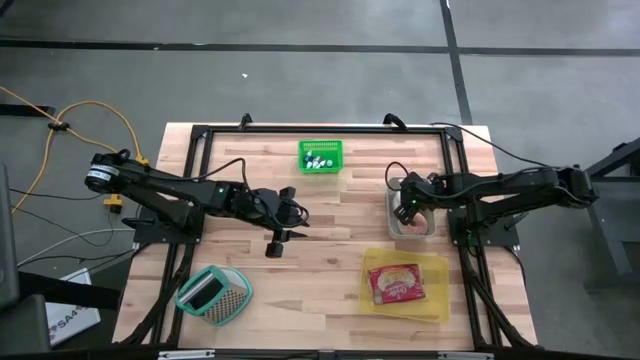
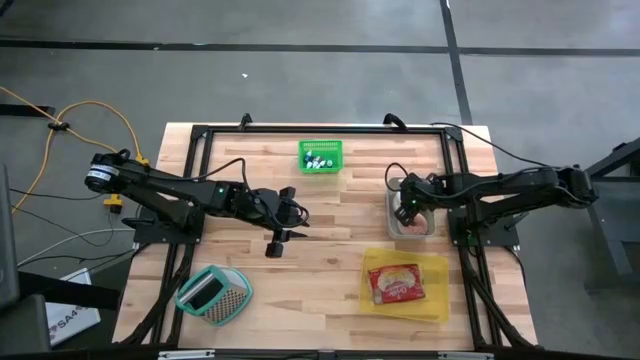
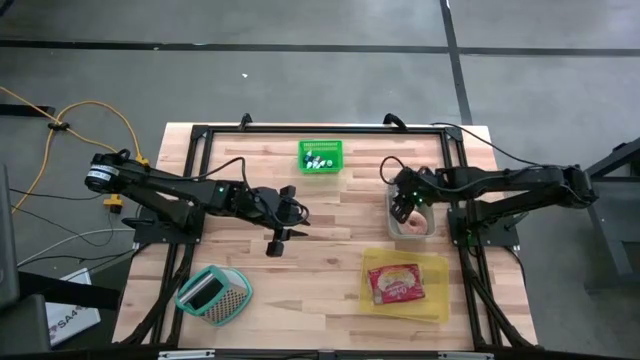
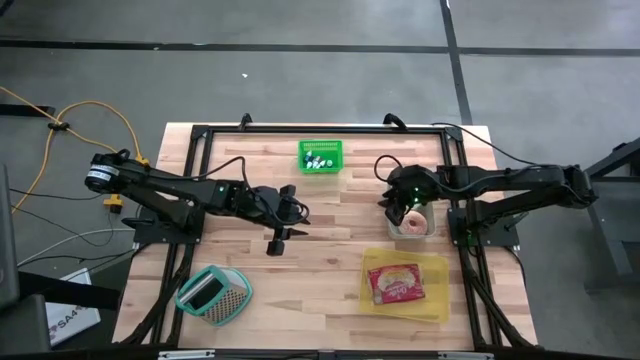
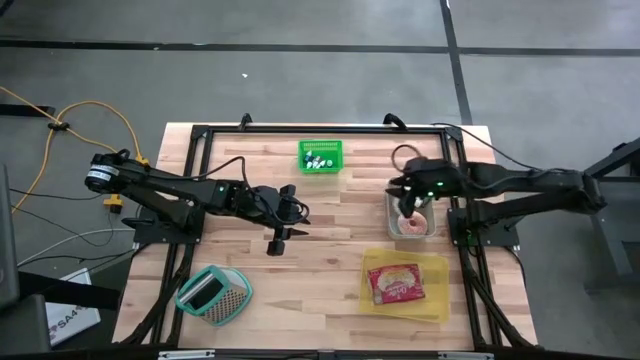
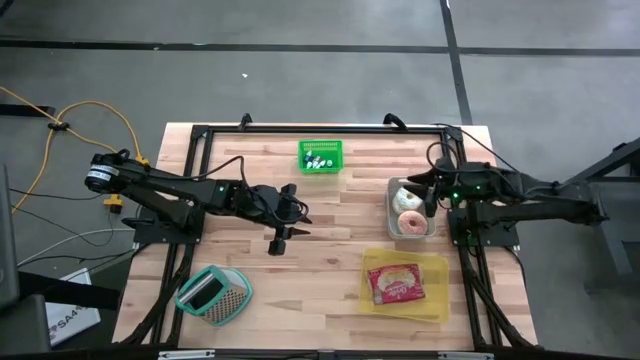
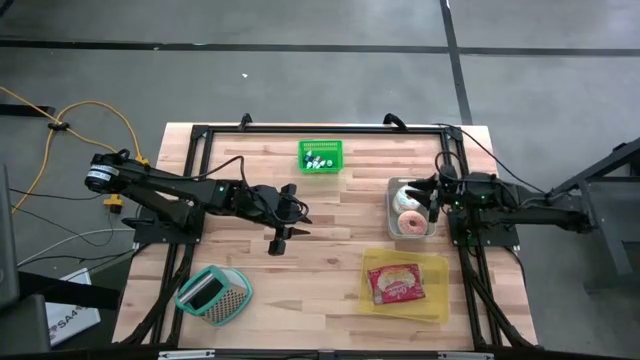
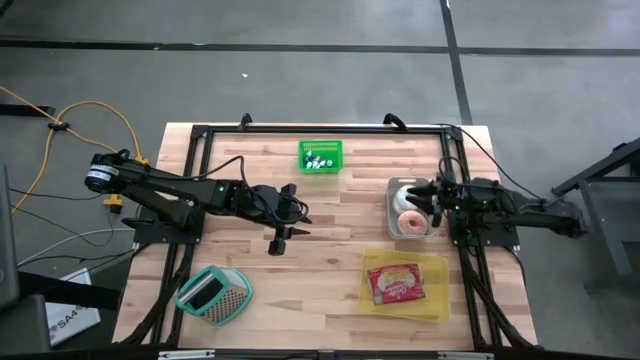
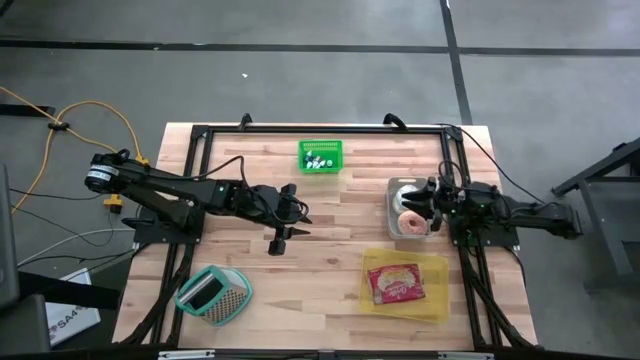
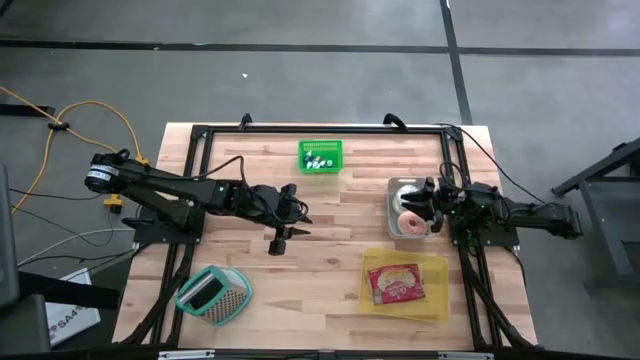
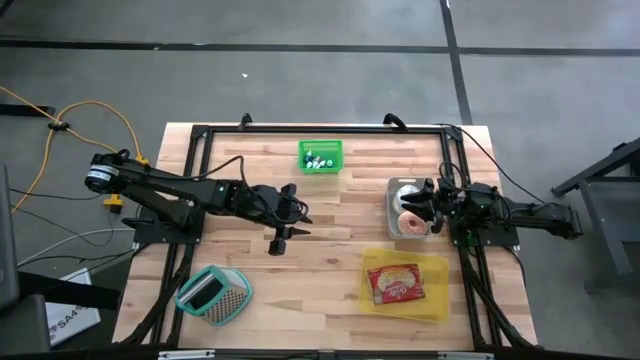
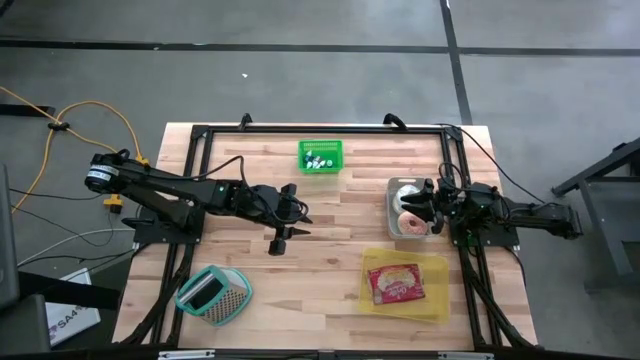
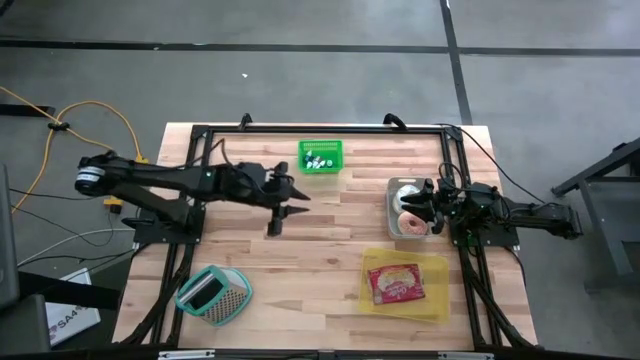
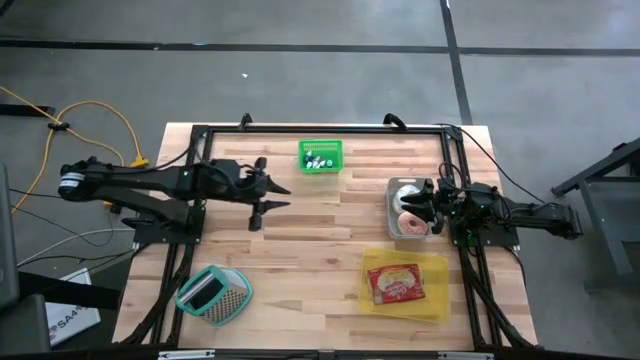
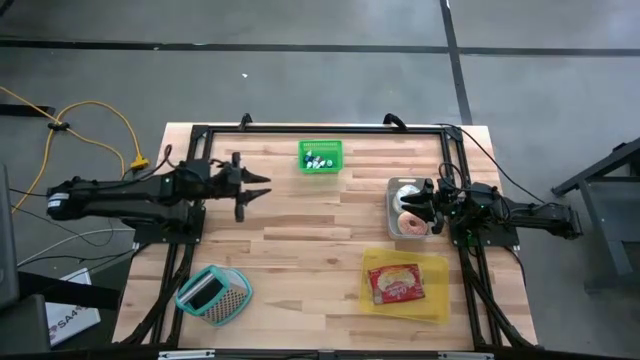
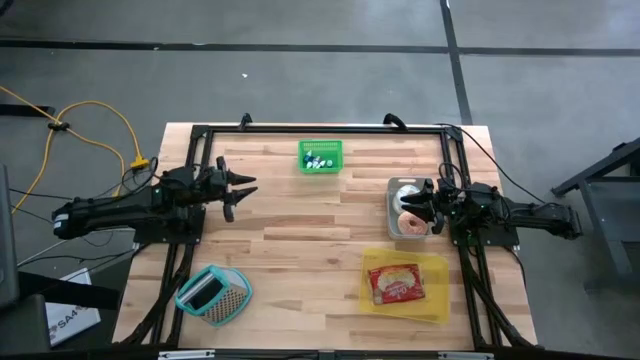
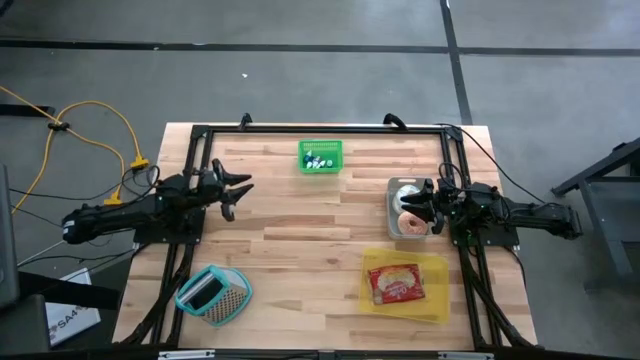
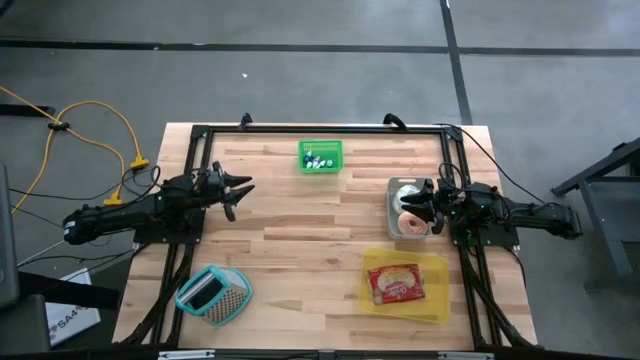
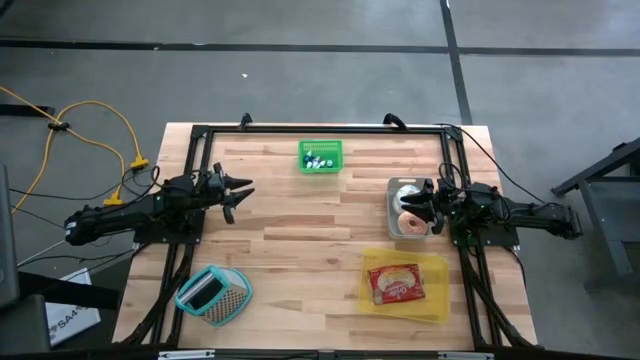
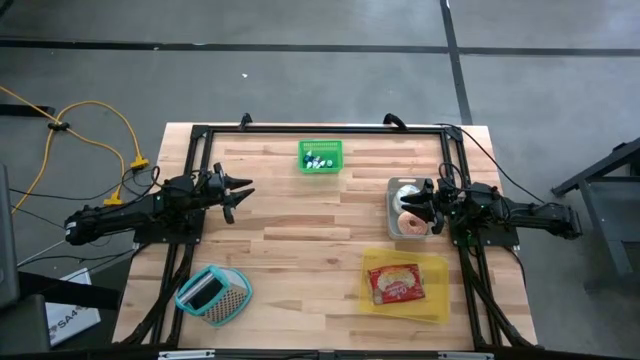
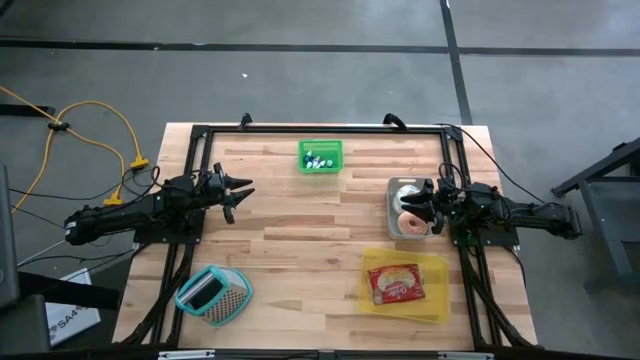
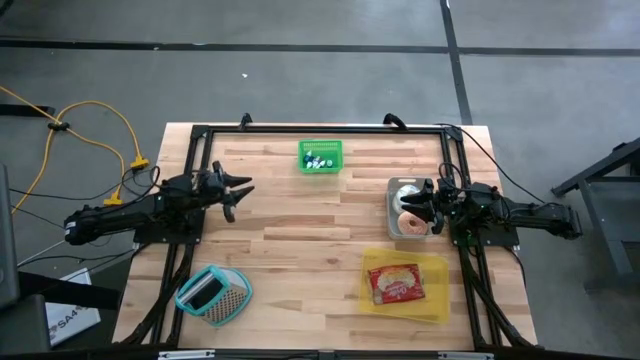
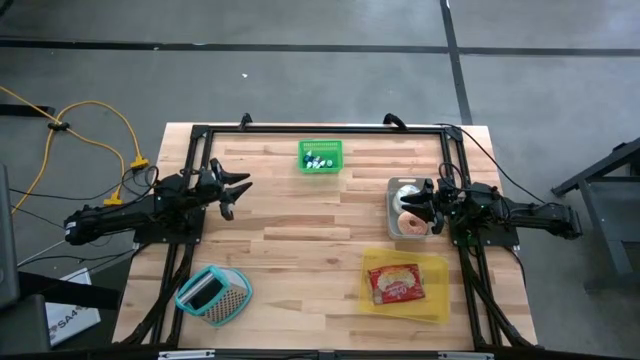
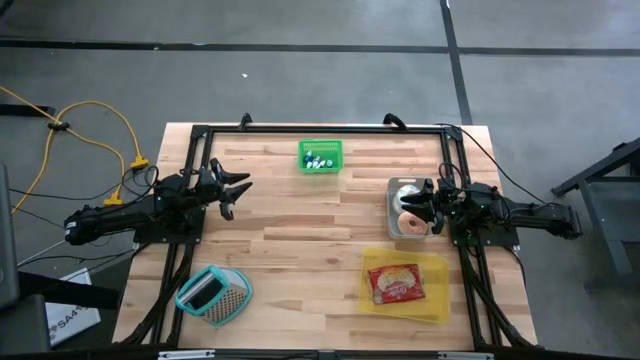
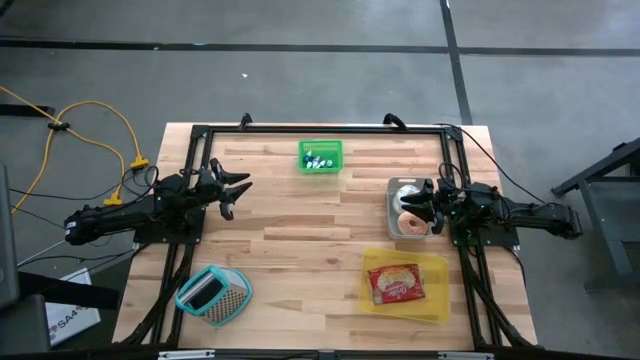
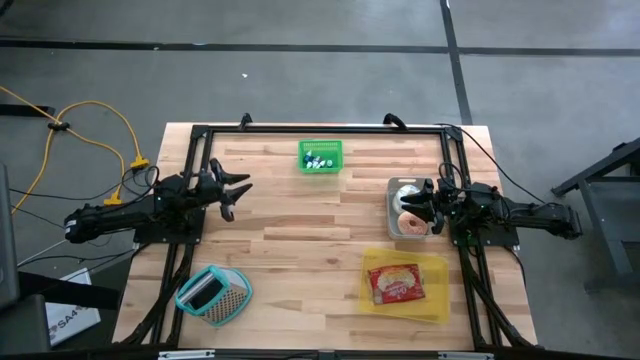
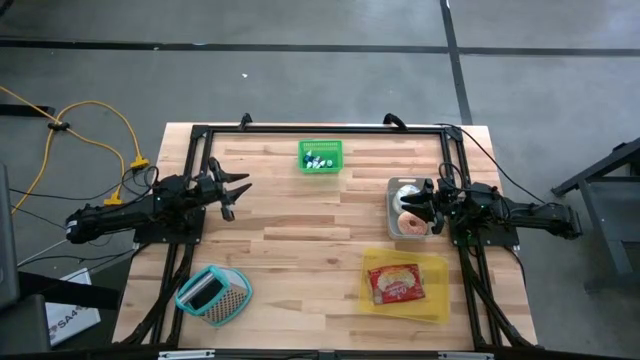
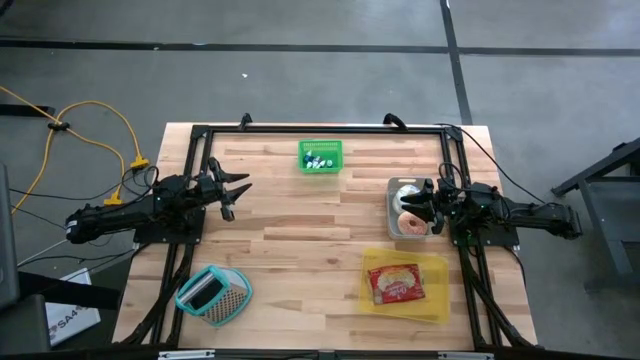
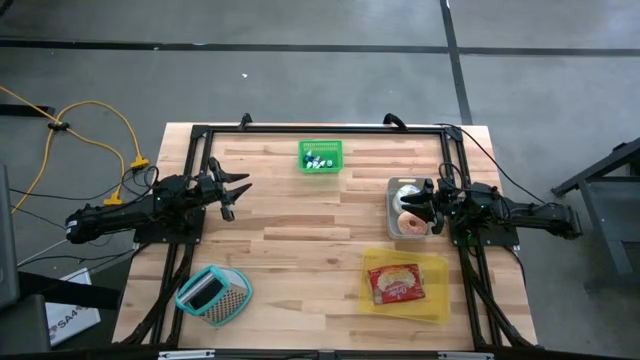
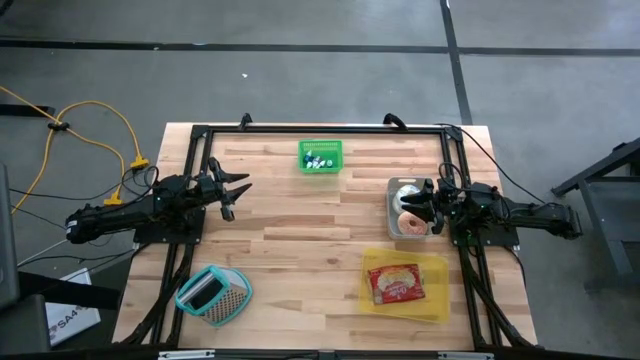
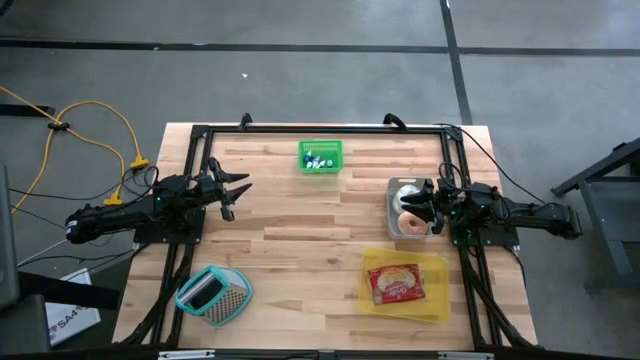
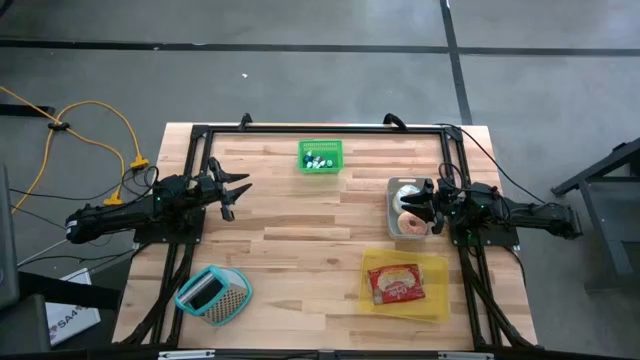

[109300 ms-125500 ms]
Return to Home Position

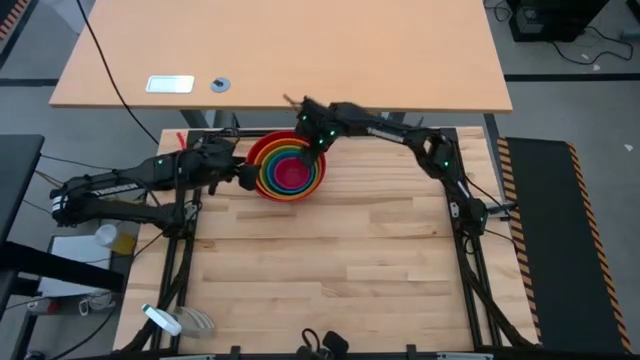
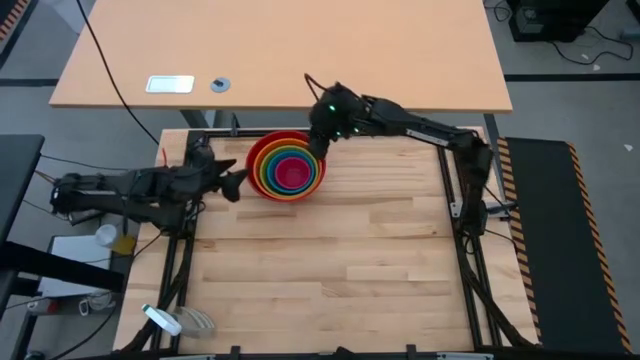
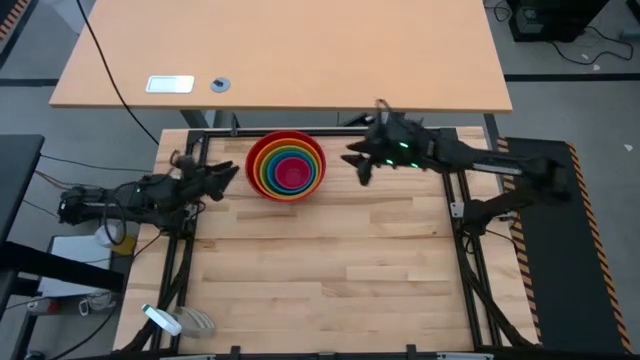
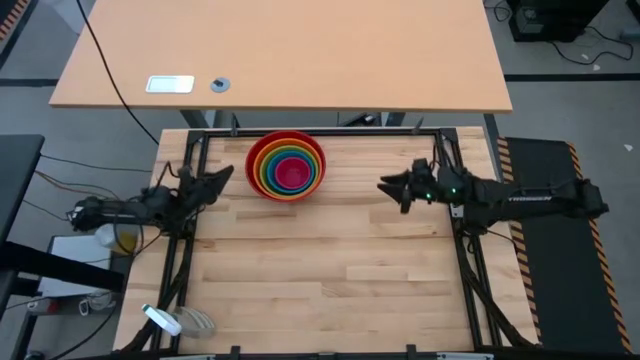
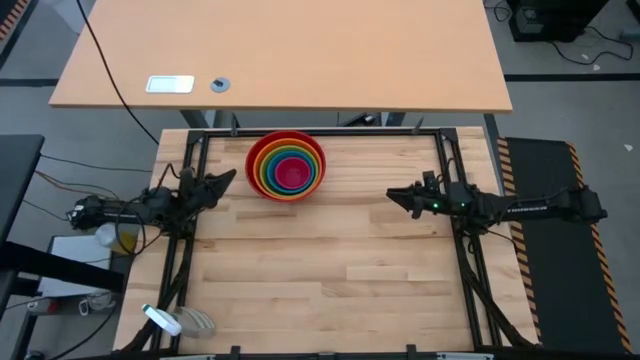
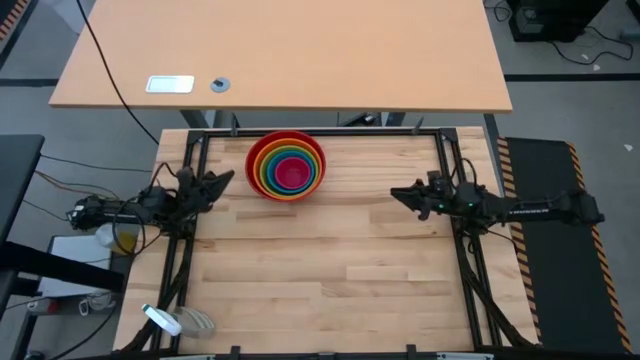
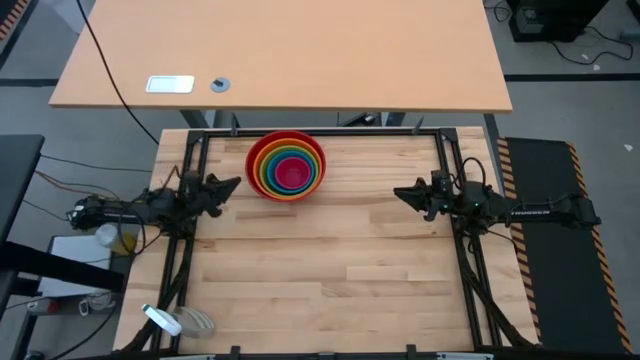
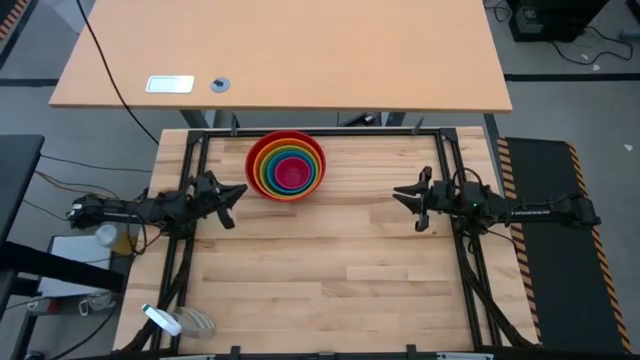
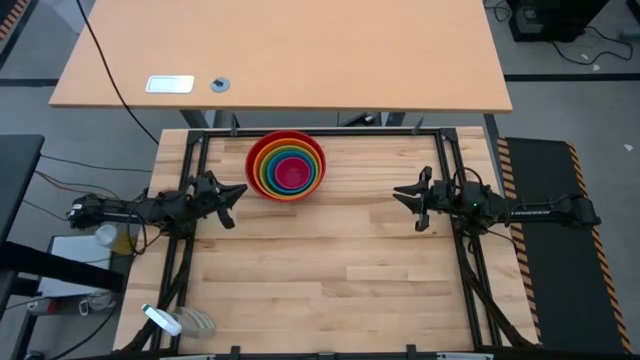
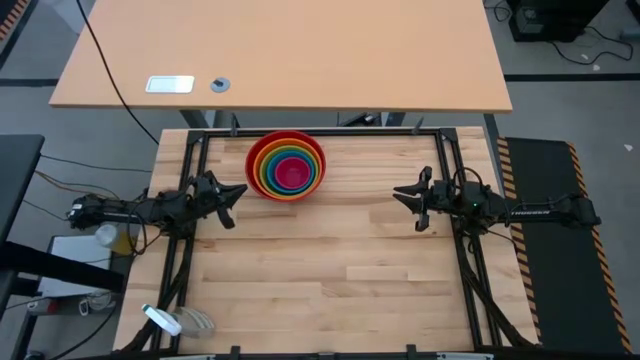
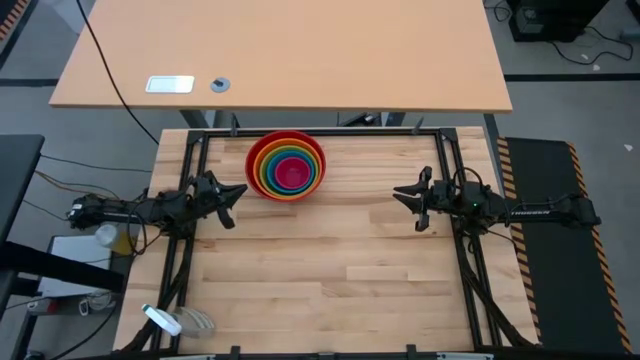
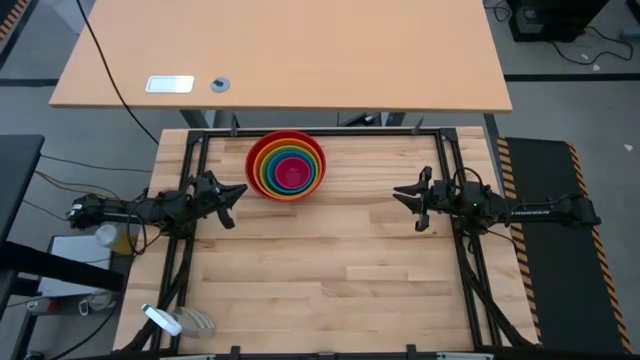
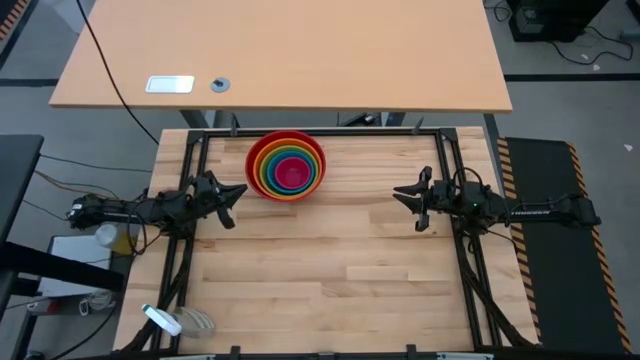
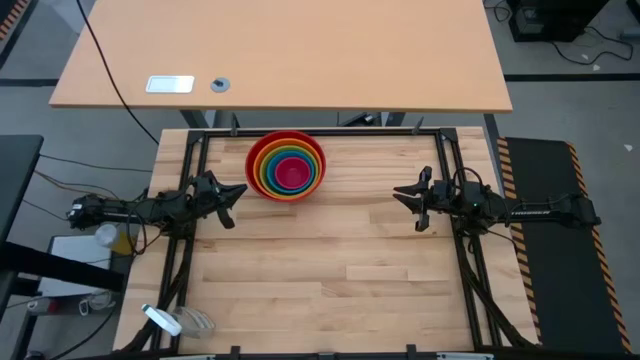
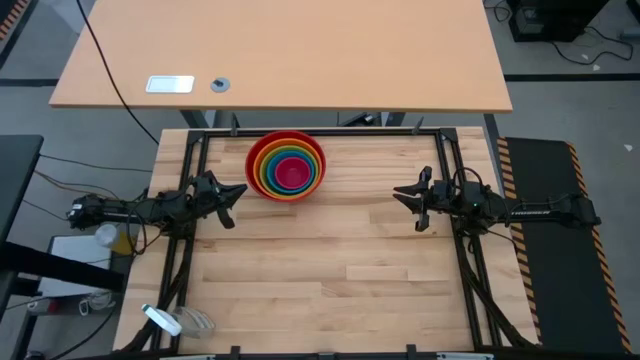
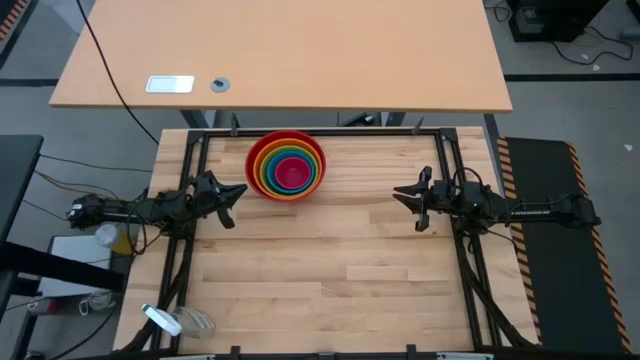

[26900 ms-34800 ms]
Return to Home Position
